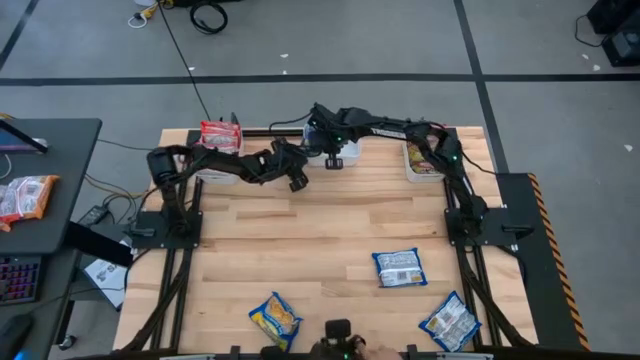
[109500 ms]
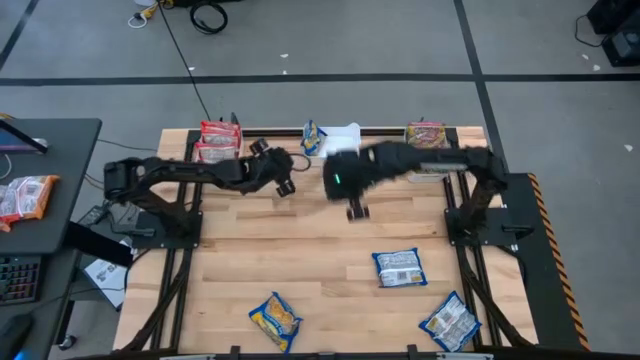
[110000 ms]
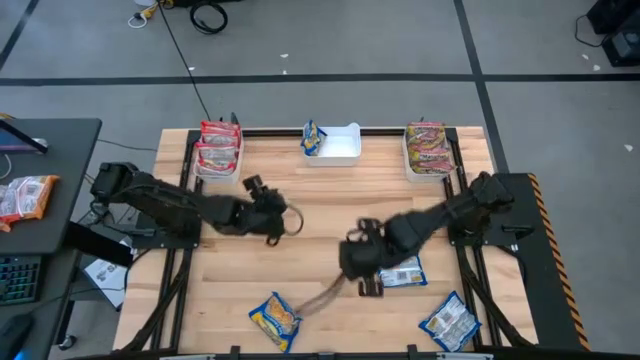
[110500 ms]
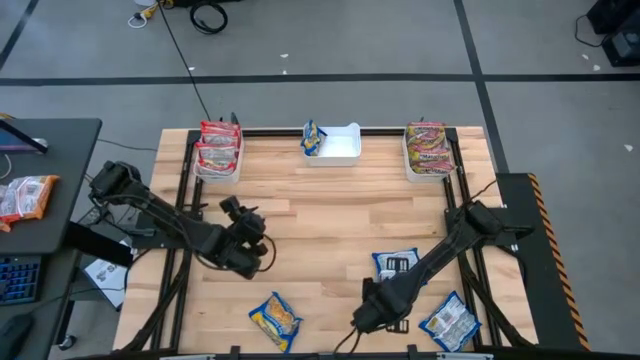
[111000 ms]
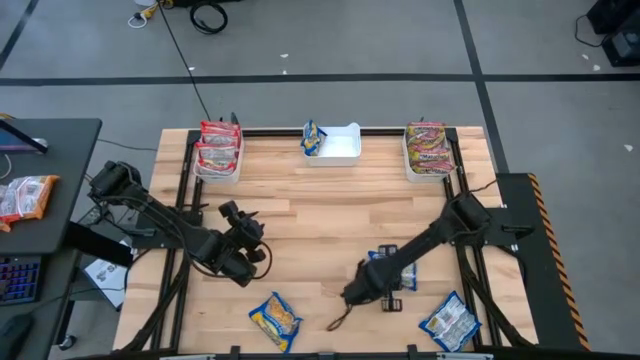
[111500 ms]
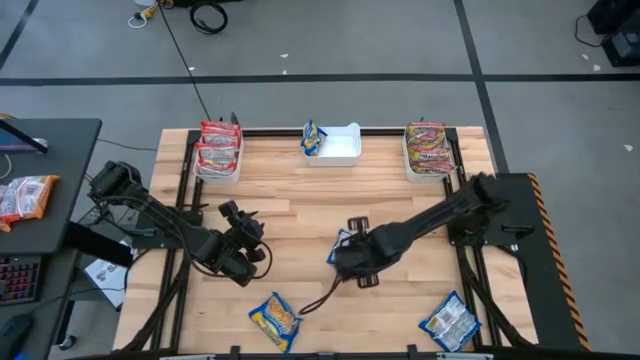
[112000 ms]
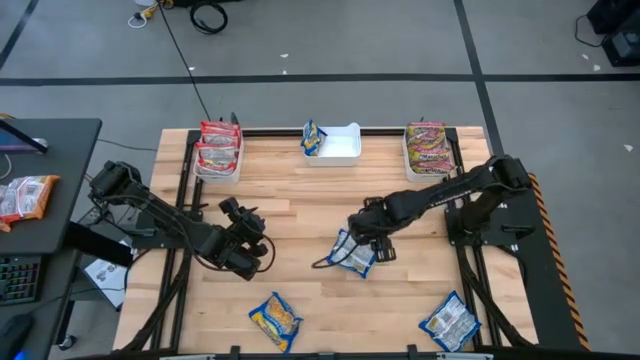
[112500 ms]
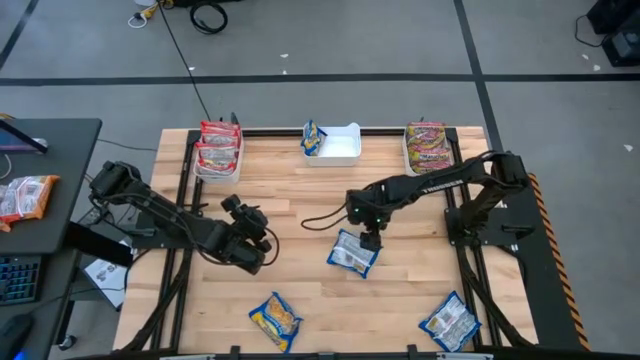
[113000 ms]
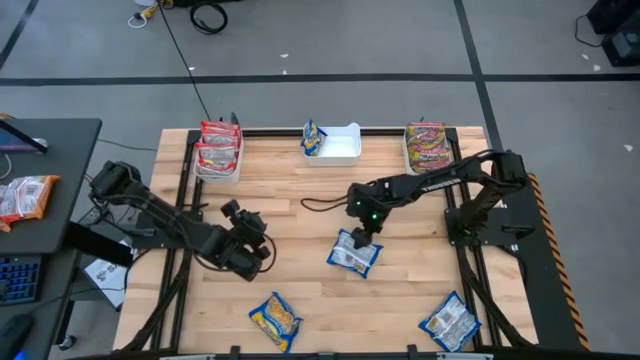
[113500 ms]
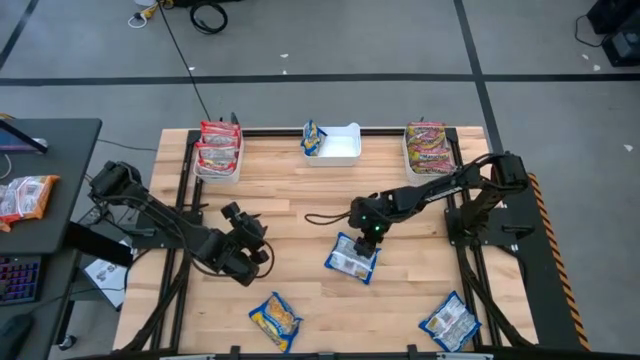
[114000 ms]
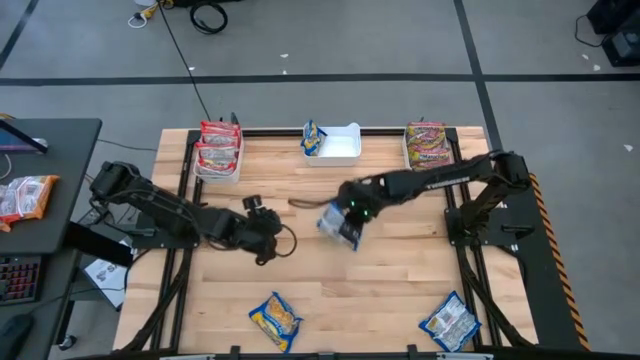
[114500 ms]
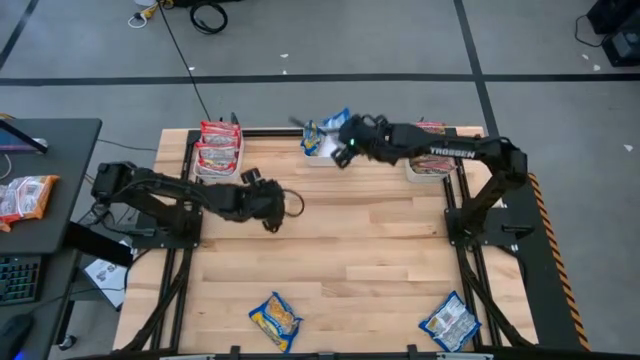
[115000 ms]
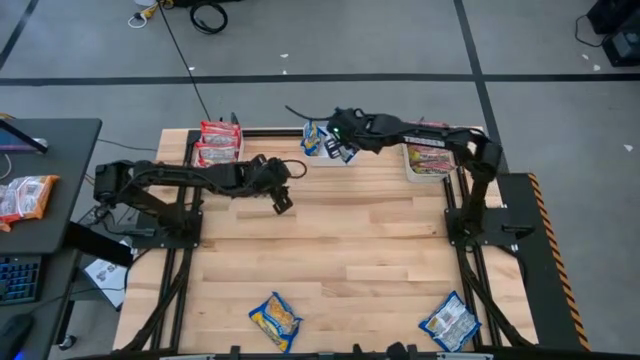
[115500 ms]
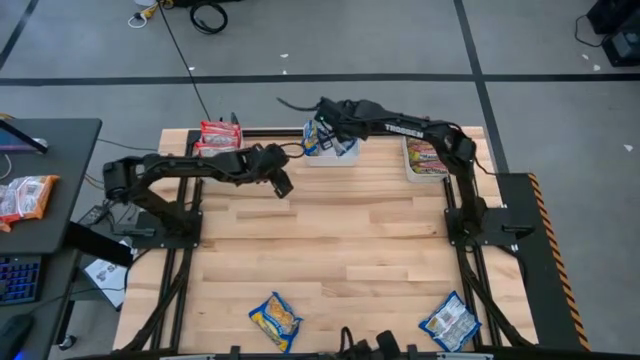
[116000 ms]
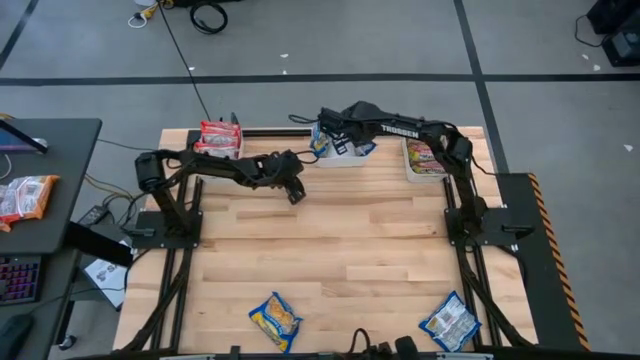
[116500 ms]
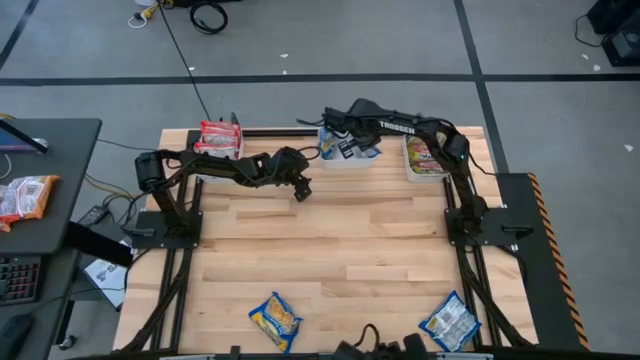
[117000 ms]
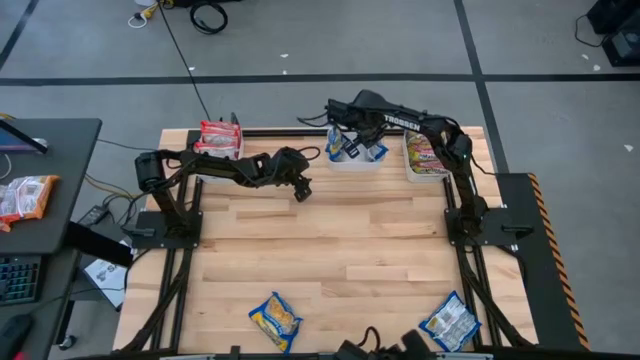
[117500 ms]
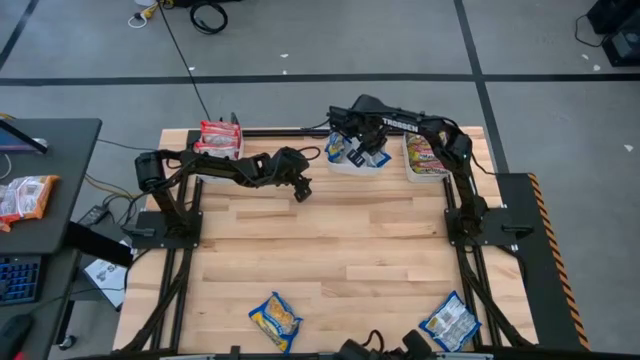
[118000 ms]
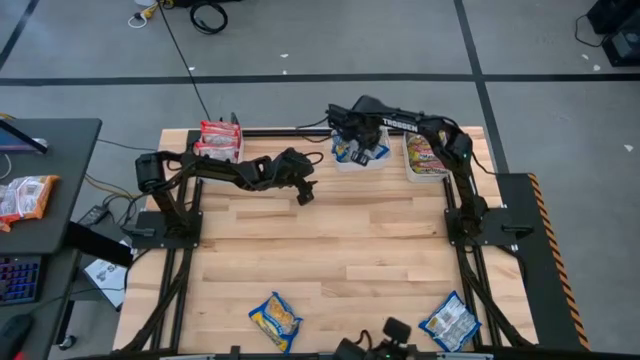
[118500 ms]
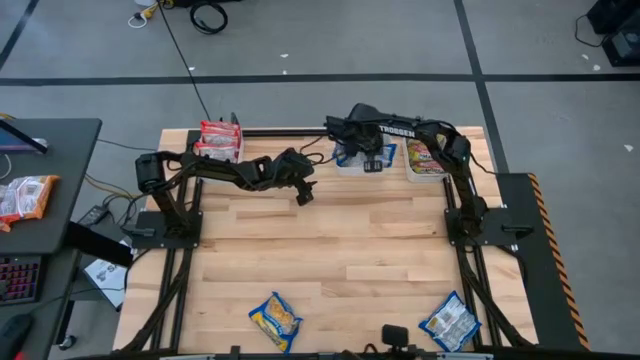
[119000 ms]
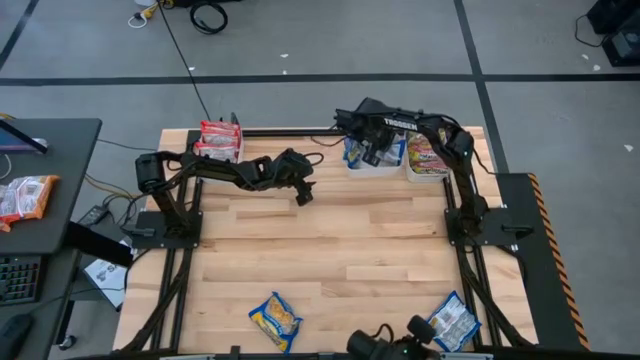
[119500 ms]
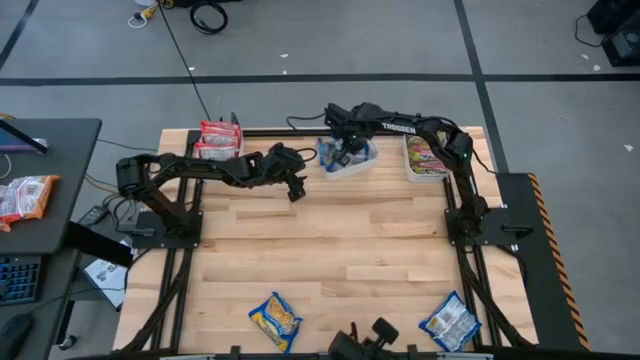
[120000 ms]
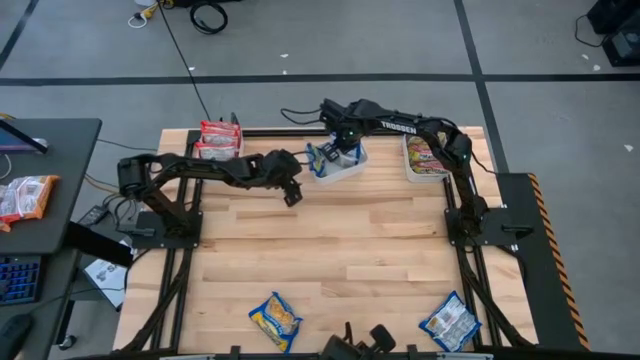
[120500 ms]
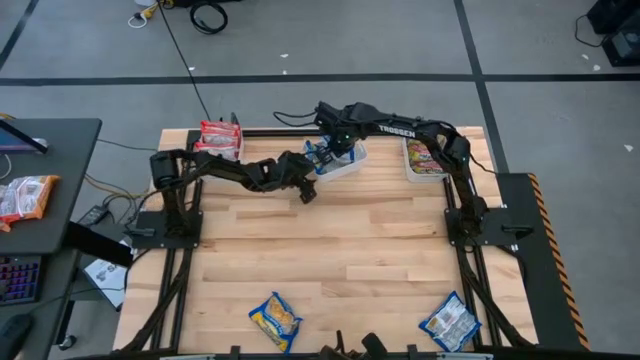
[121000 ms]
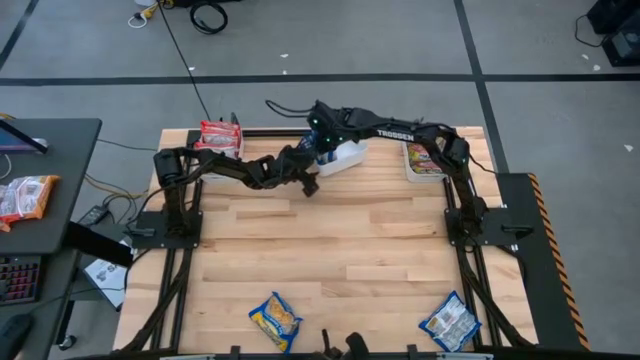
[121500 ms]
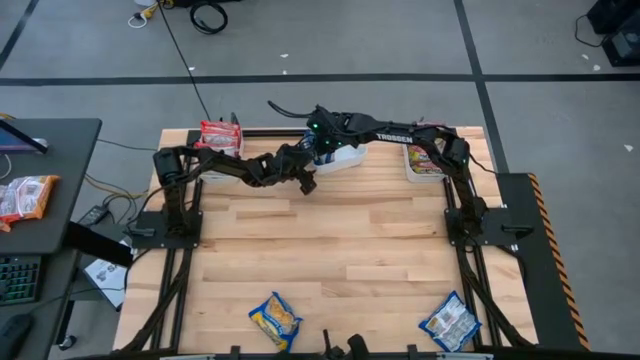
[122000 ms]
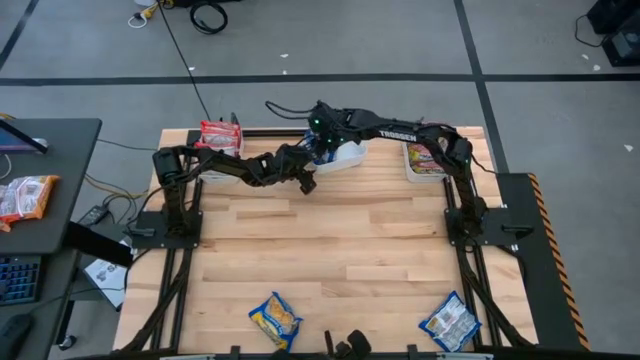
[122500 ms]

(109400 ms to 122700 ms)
Task: Sort Maruchan noodles
Put the blue noodle pack into the middle white bin

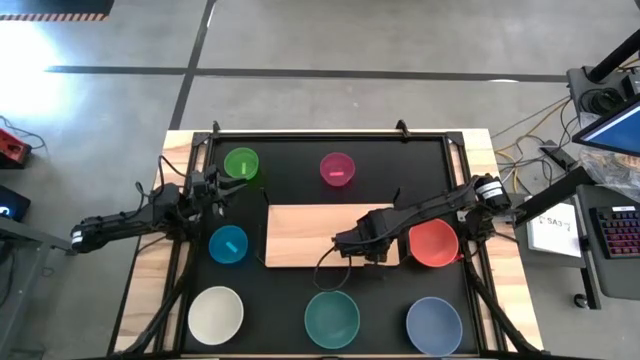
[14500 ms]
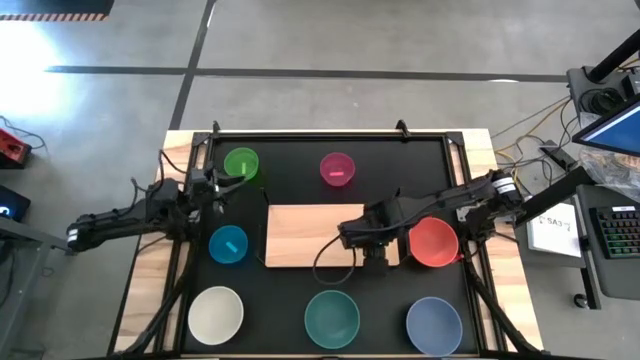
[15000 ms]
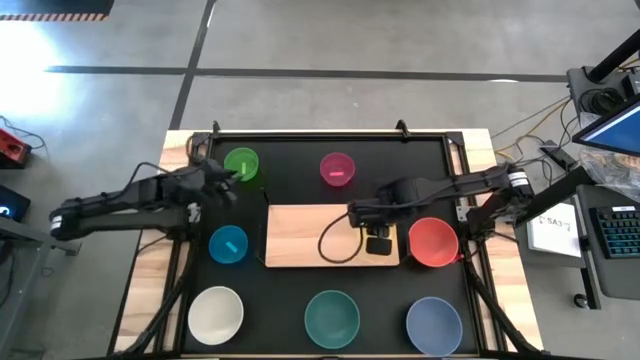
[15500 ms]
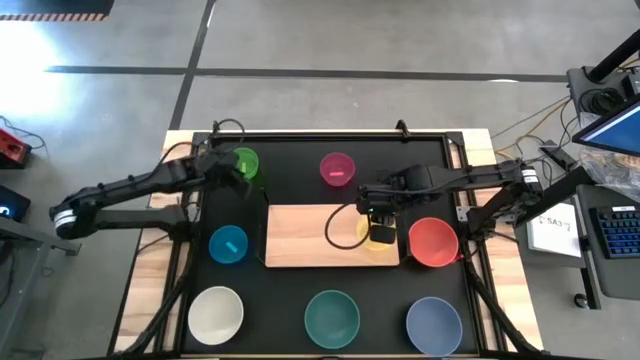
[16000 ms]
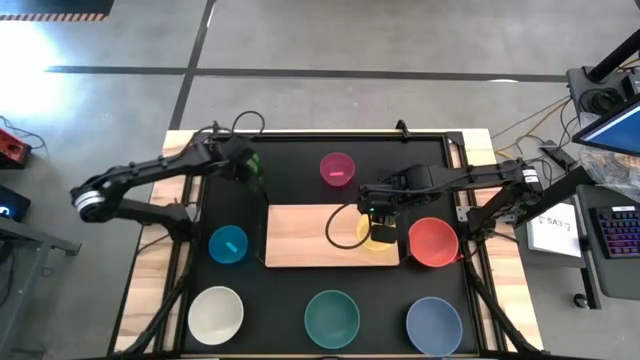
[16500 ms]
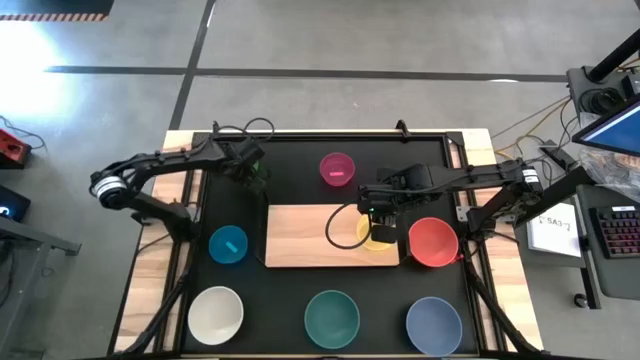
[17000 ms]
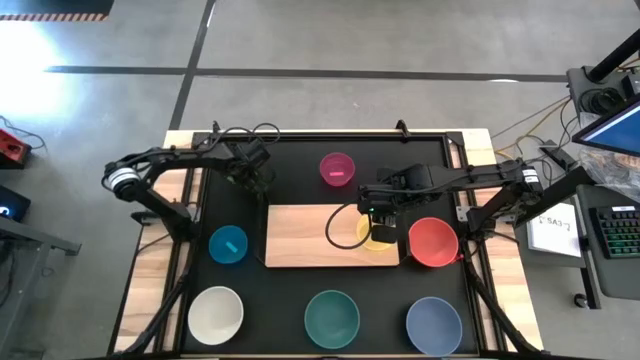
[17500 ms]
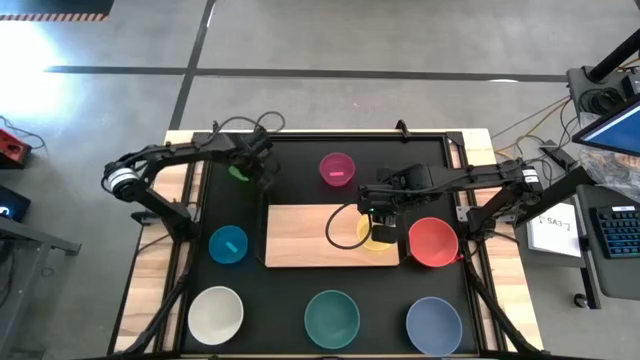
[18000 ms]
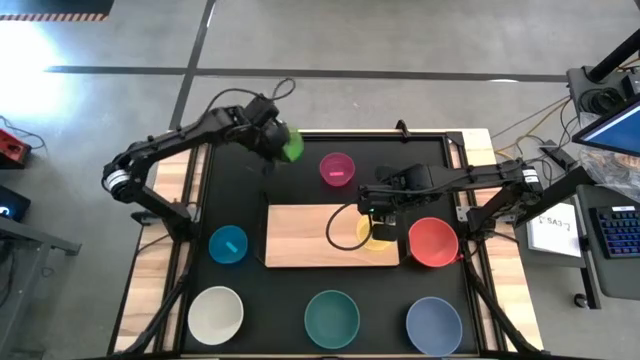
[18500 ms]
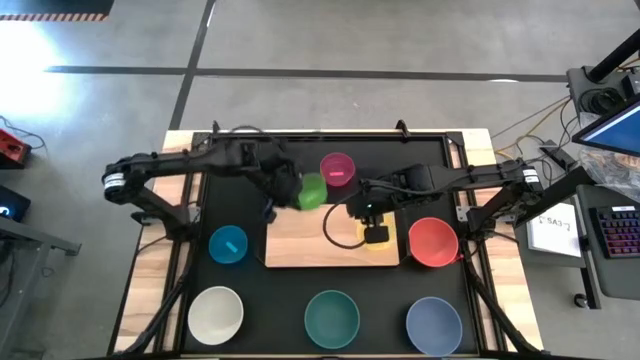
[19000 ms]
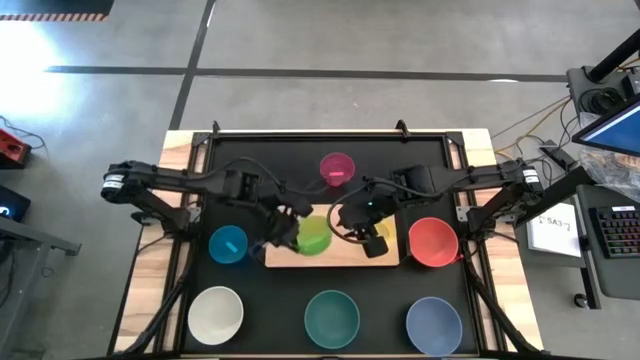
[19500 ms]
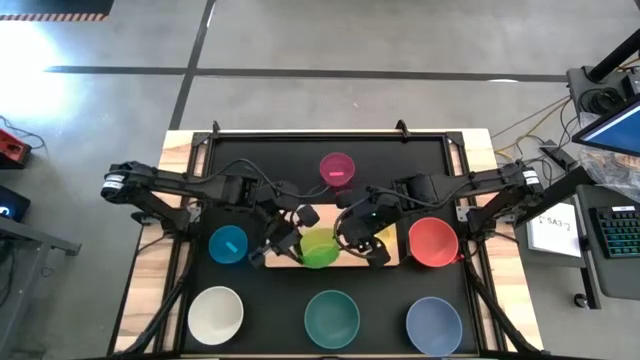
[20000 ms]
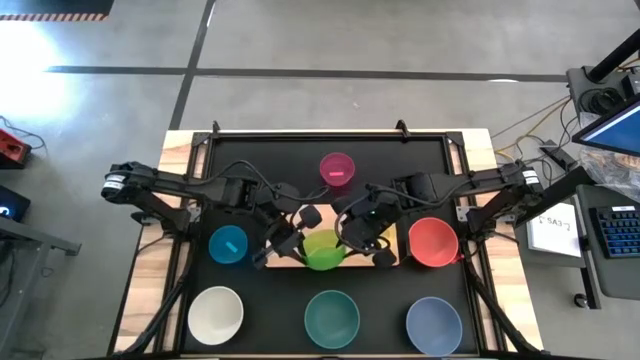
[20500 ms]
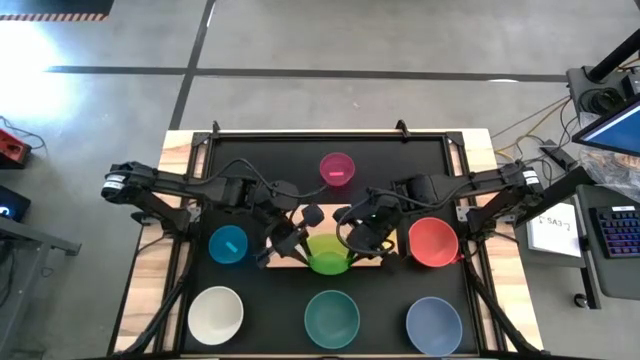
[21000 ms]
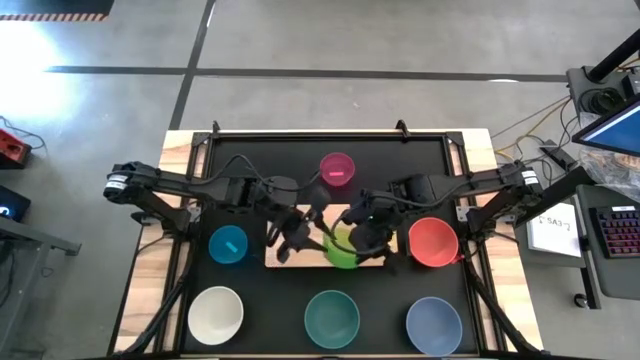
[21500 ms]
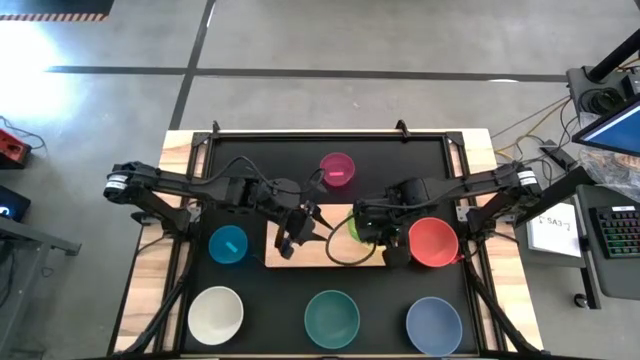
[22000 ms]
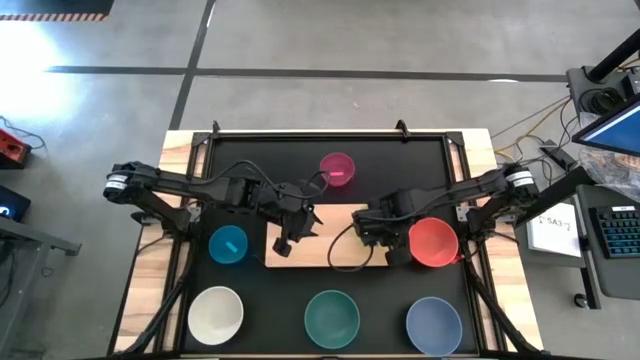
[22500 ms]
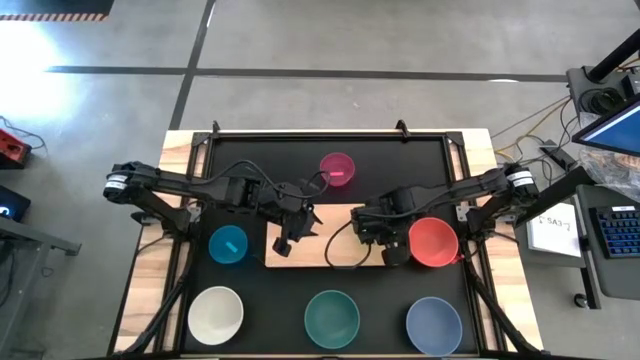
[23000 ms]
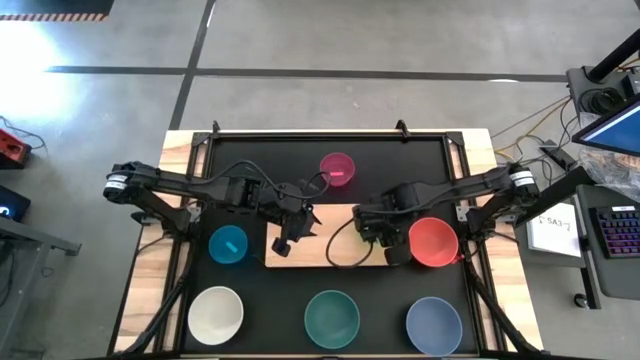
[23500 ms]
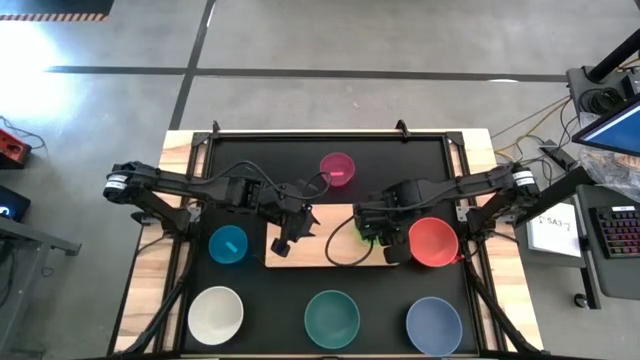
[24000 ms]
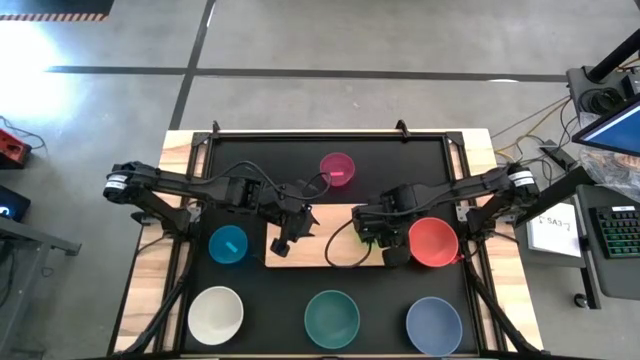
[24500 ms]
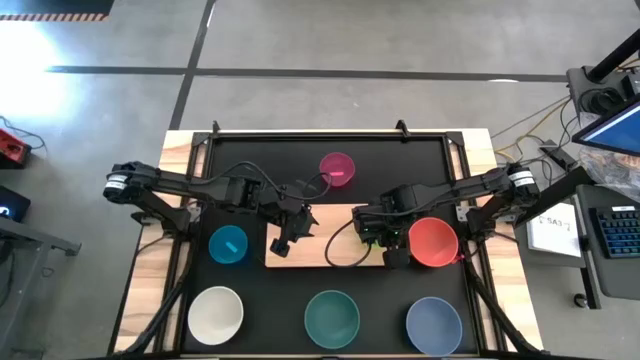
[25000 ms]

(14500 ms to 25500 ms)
Task: Place and stack bowls onto a shelf
Stack the light green bowl on top of the yellow bowl on the shelf
